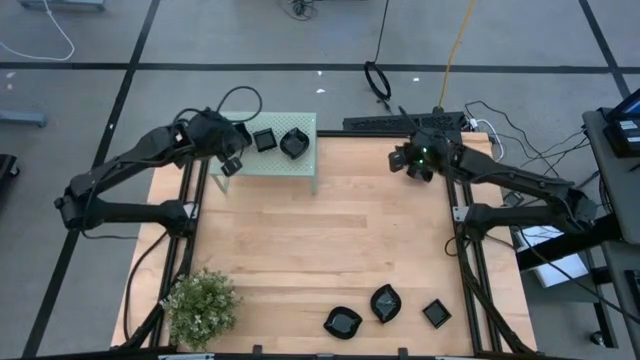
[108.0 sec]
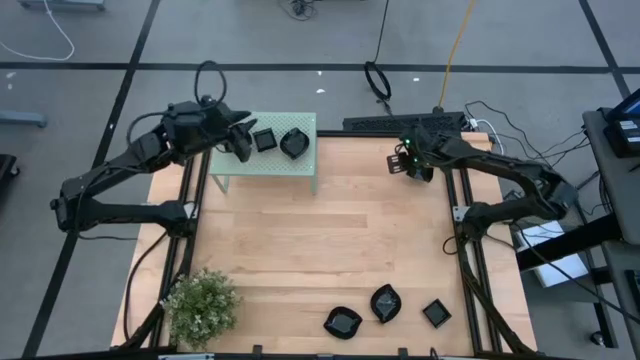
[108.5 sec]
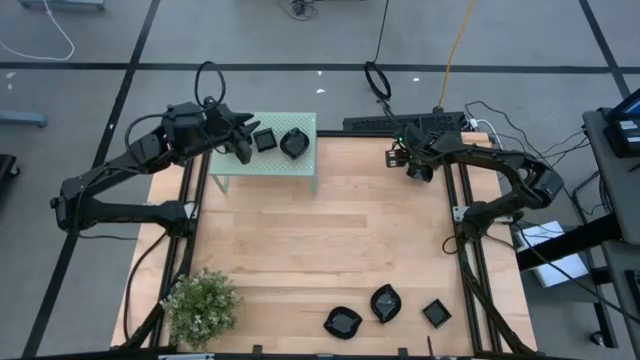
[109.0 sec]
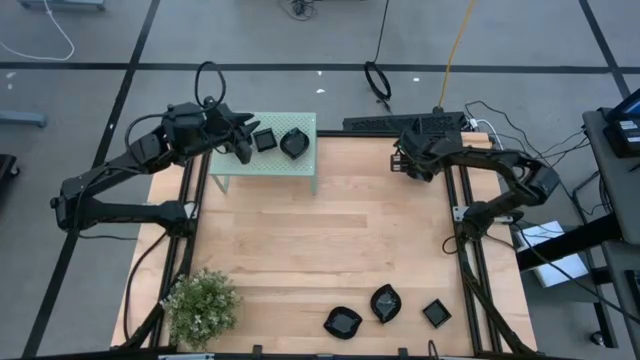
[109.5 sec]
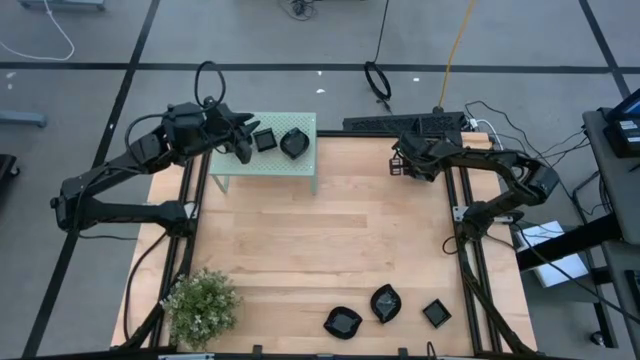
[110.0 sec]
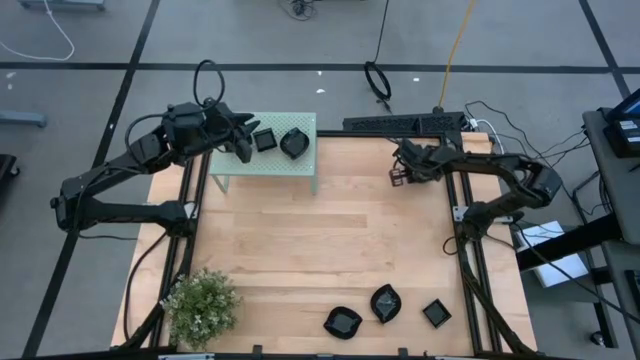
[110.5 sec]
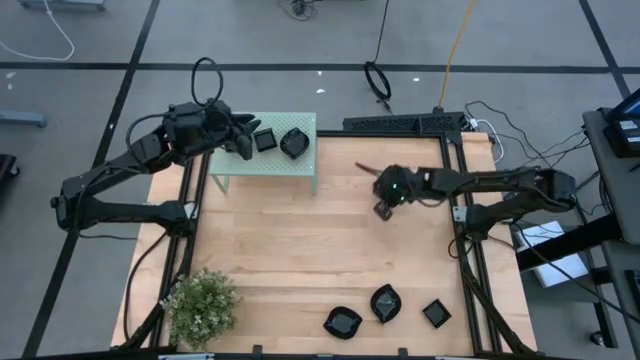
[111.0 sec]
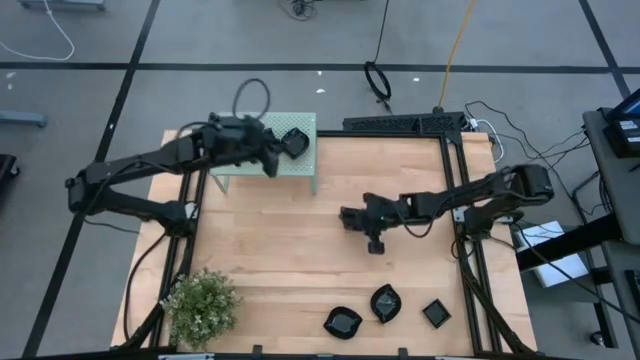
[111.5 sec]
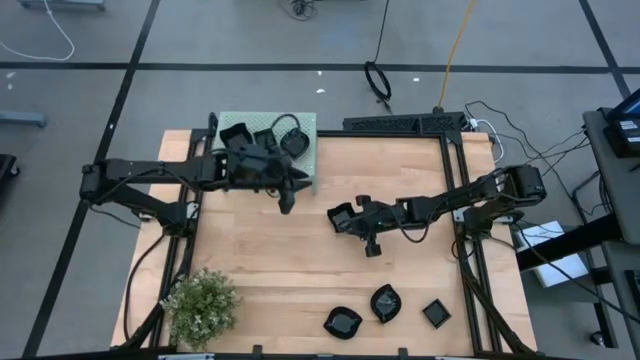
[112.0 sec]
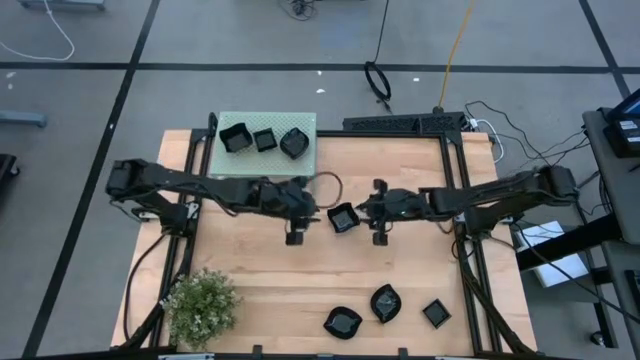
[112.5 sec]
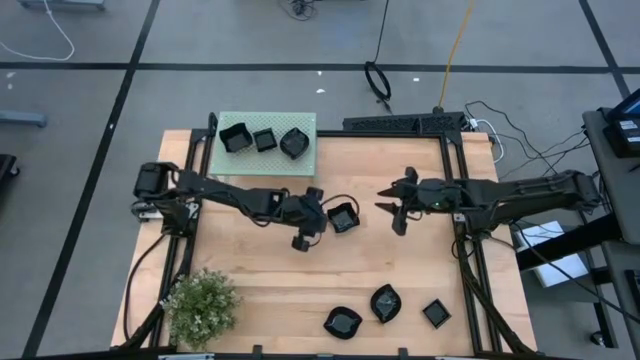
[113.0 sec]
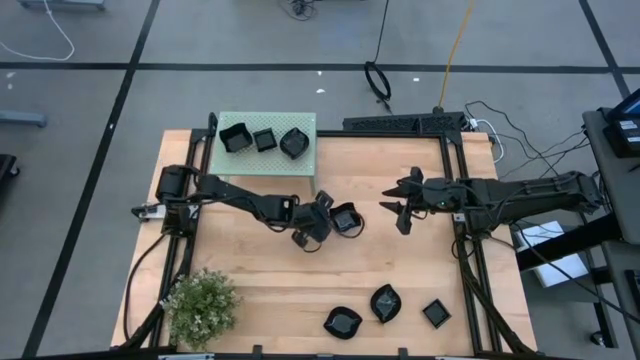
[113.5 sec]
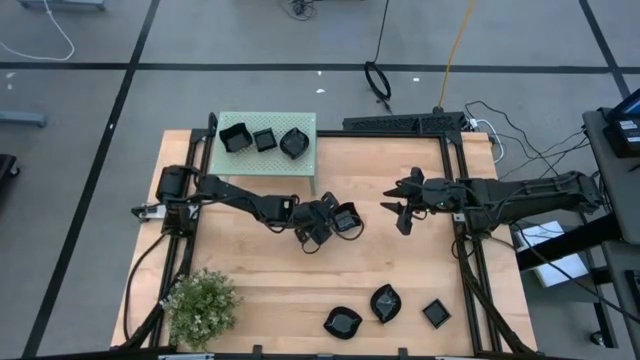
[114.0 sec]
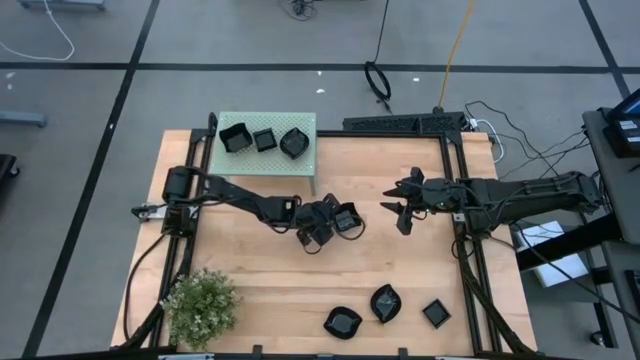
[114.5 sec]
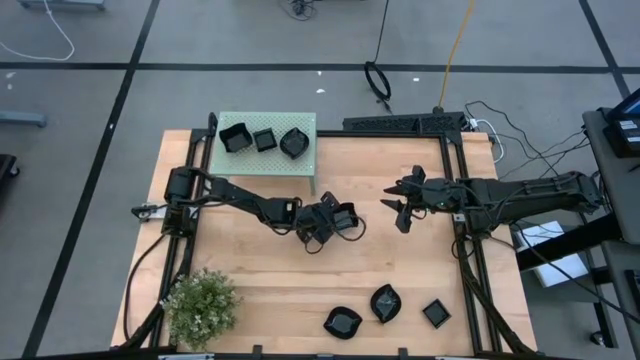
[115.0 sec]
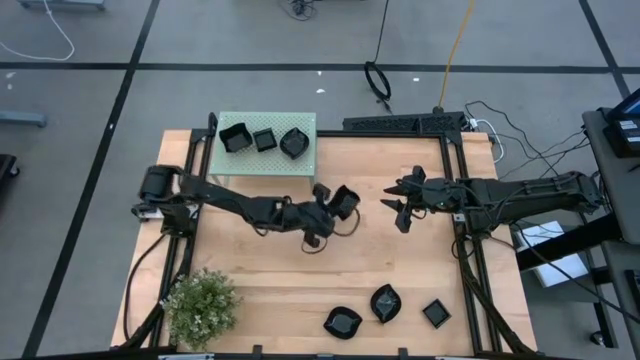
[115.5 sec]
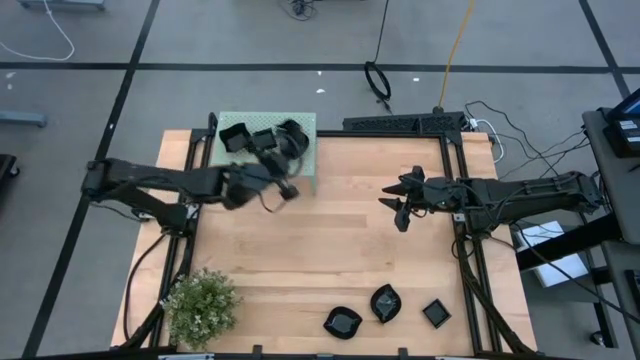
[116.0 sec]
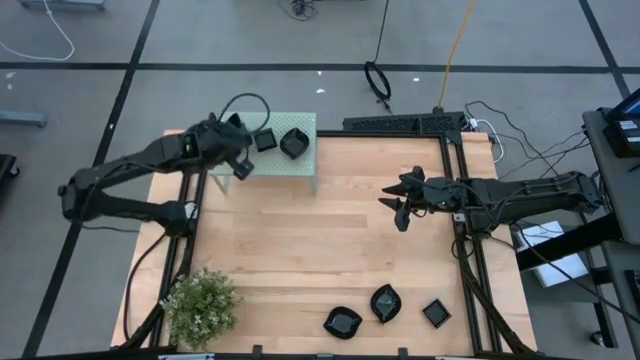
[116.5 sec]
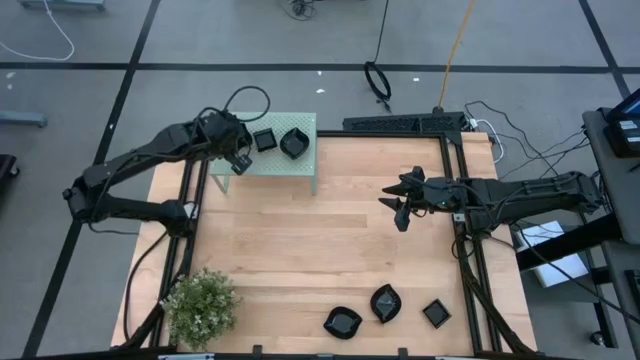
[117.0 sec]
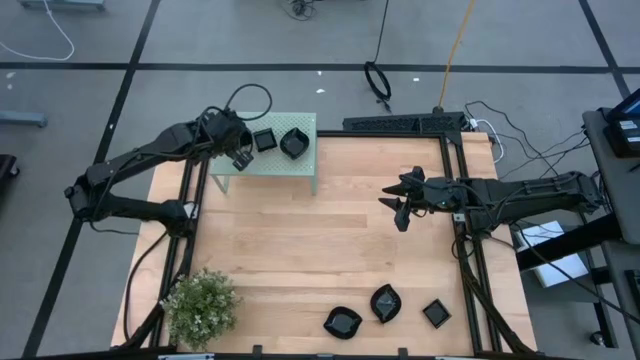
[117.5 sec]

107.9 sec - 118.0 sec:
Task: Pick & Place Mini shaped plates
Stack the distorted square plate on top of the distorted square plate on the shelf

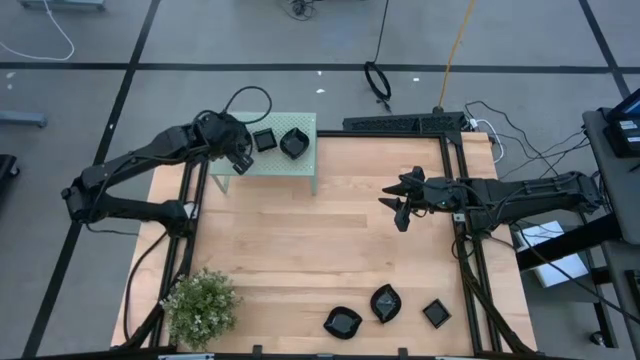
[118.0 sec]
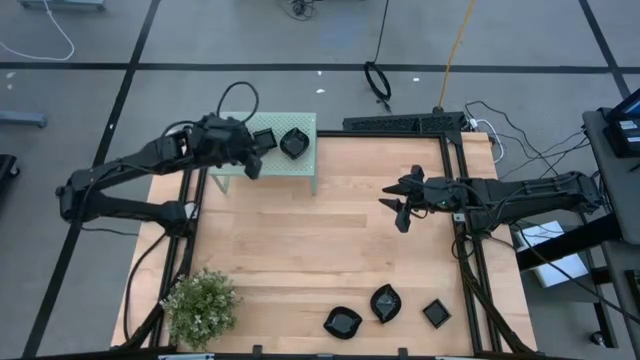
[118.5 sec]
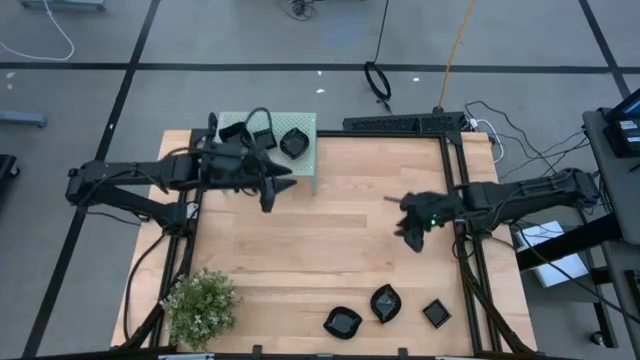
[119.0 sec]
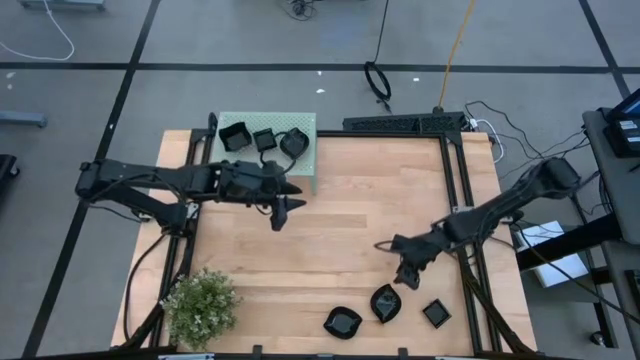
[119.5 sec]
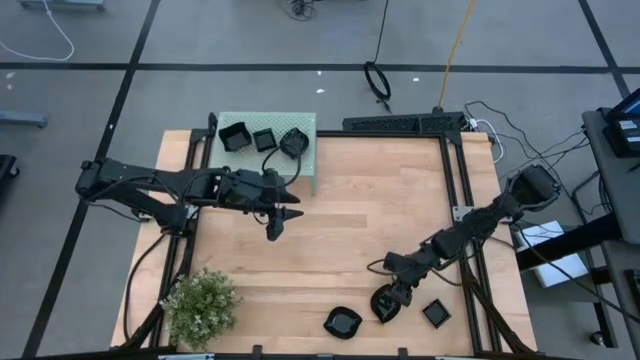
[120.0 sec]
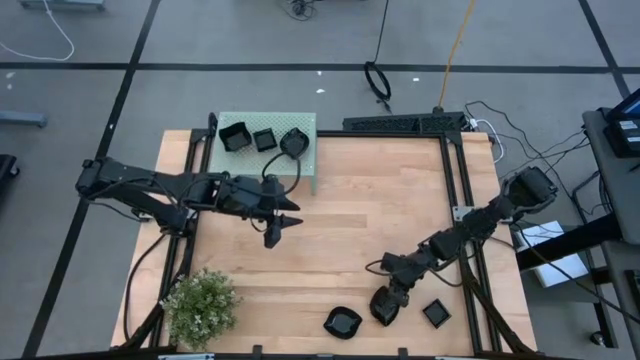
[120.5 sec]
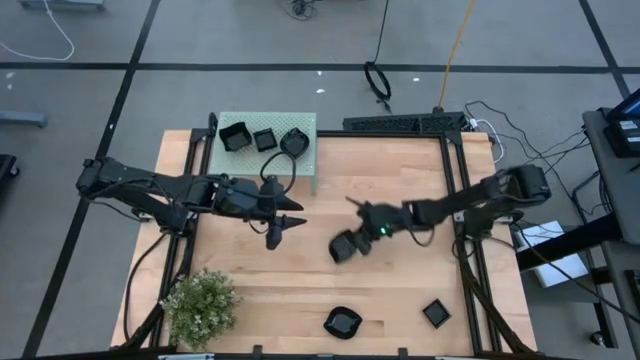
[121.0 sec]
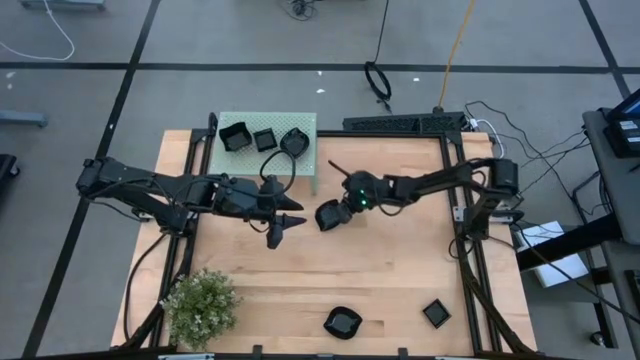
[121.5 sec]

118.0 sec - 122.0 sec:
Move the right leaf shaped plate to the center of the table

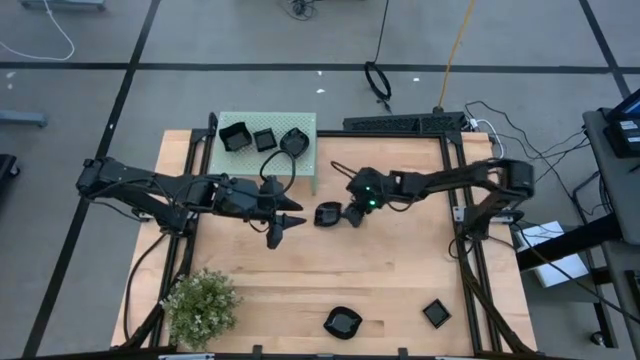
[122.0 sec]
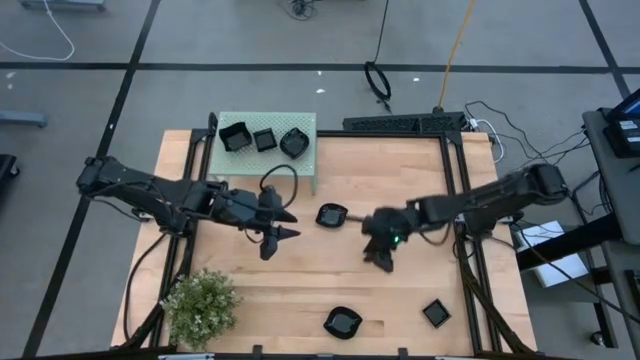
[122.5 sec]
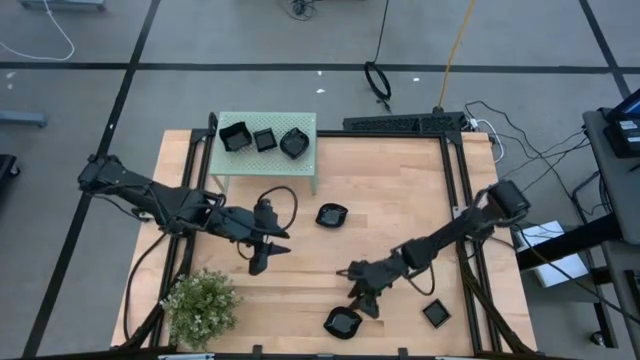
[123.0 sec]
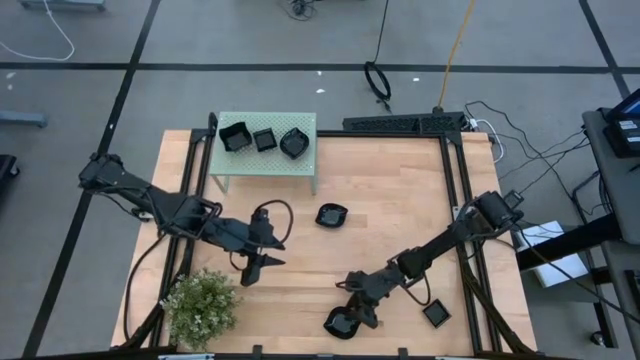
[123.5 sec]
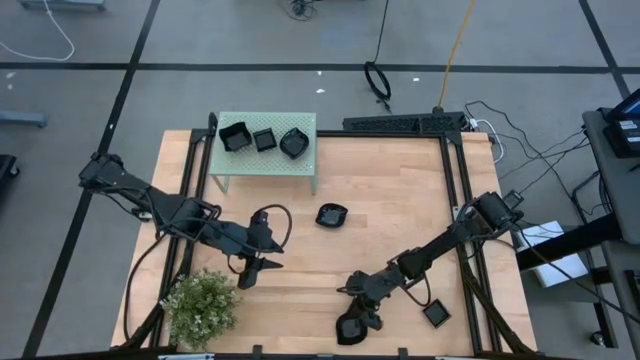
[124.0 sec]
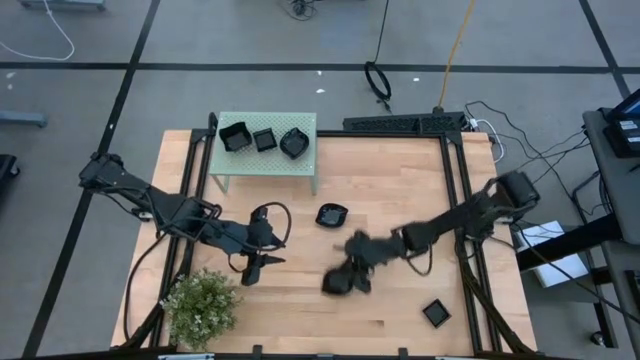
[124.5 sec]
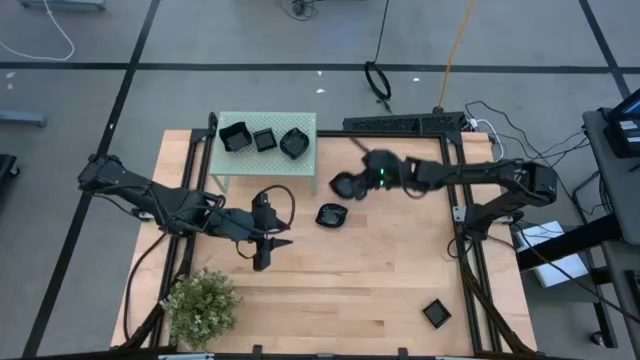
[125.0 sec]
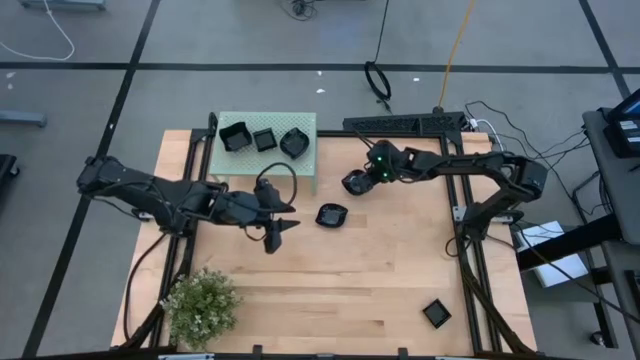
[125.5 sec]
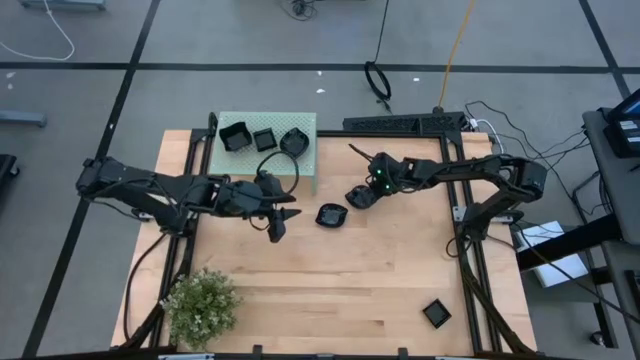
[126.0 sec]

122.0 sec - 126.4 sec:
Move the bottom leaf shaped plate to the top center of the table

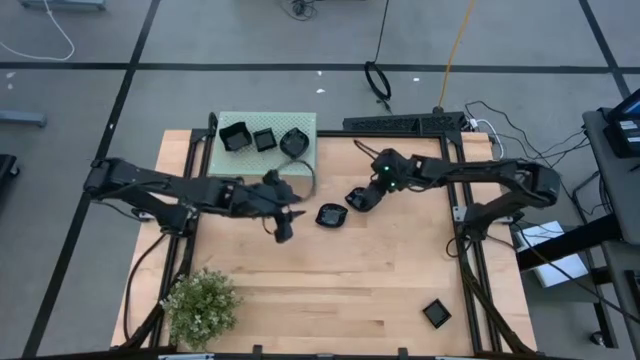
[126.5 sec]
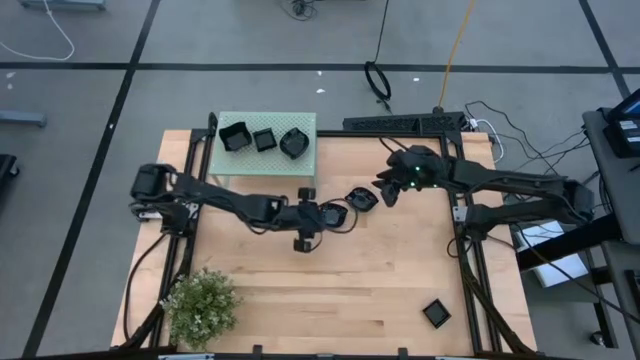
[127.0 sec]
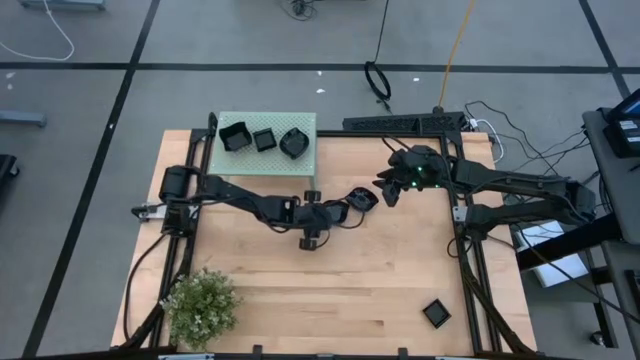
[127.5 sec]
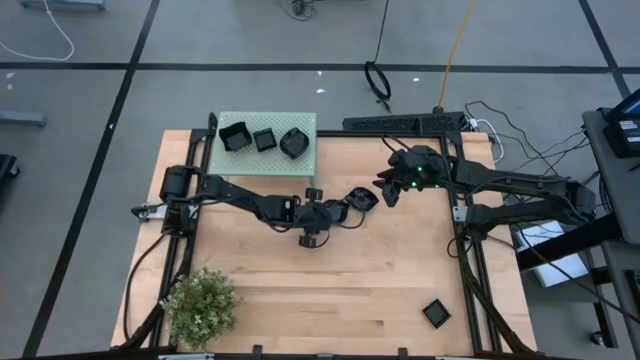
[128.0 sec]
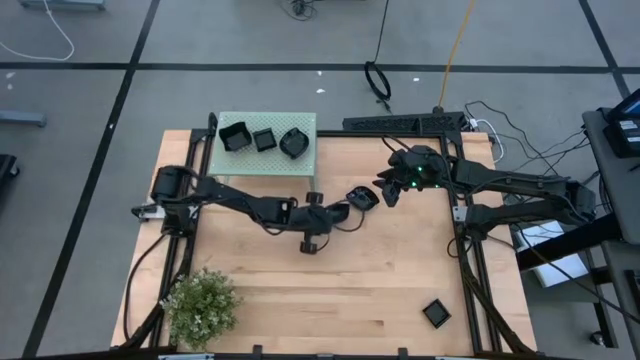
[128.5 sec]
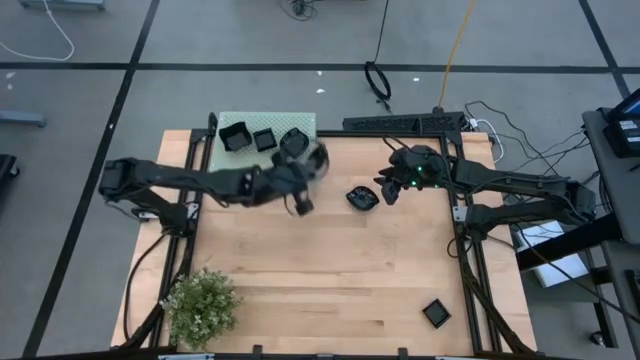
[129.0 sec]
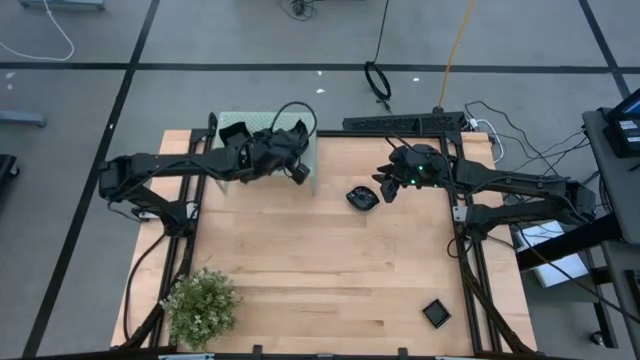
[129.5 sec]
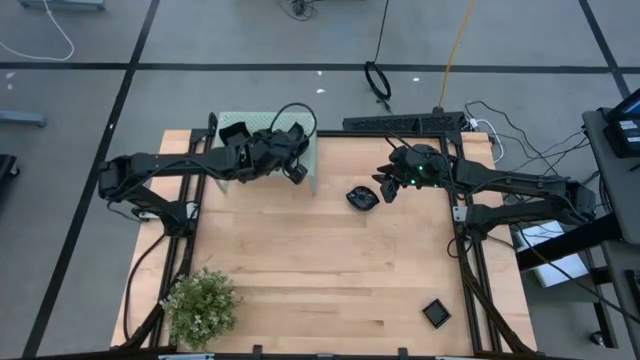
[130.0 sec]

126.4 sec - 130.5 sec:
Stack the left leaf shaped plate on top of the leaf shaped plate on the shelf
